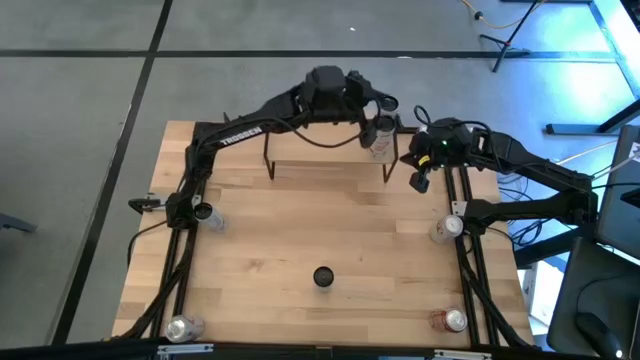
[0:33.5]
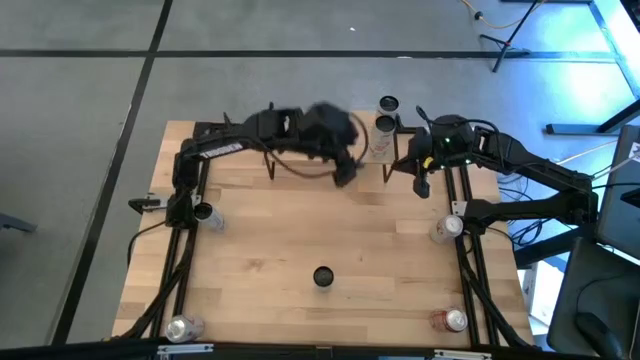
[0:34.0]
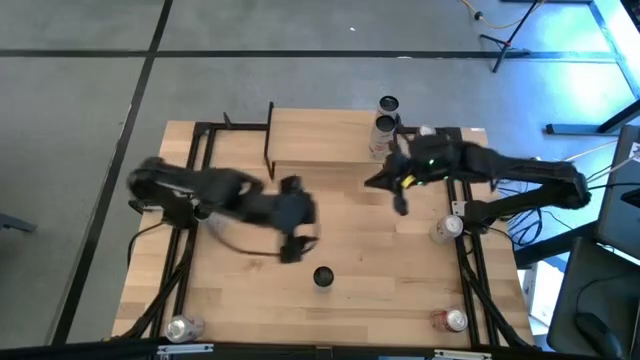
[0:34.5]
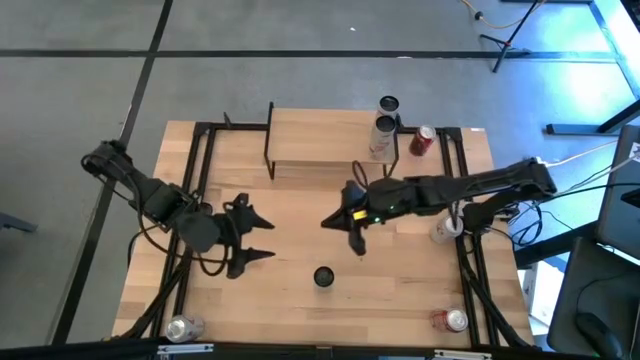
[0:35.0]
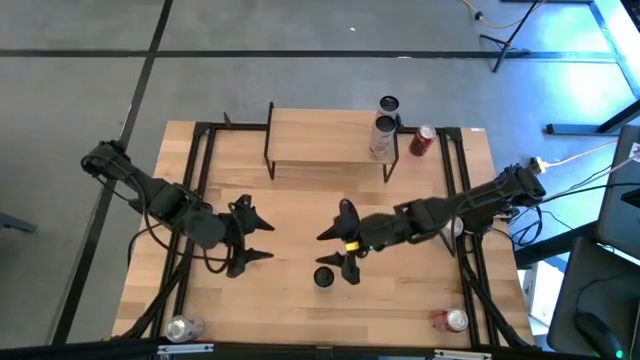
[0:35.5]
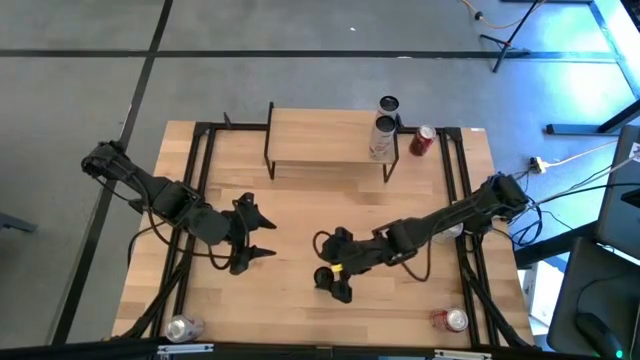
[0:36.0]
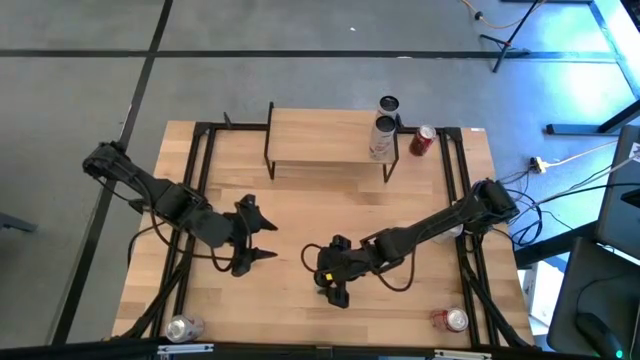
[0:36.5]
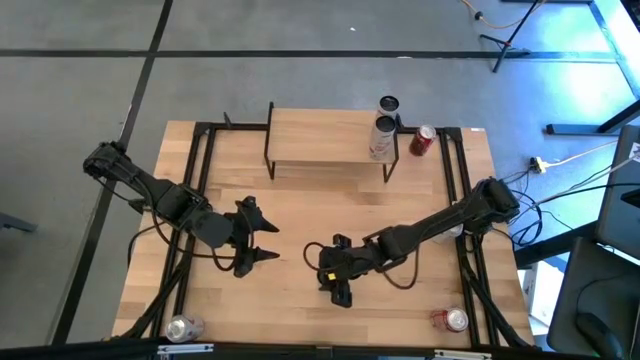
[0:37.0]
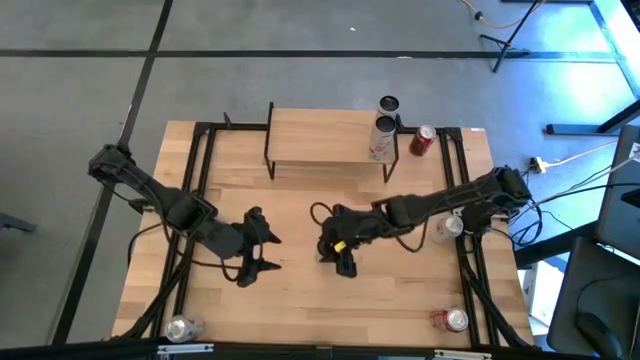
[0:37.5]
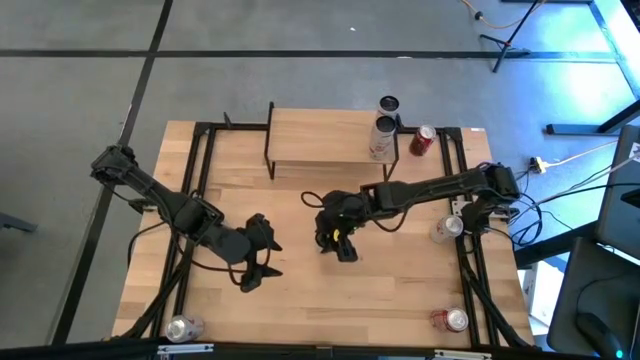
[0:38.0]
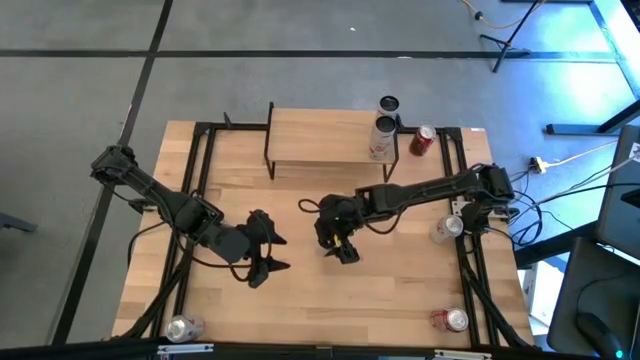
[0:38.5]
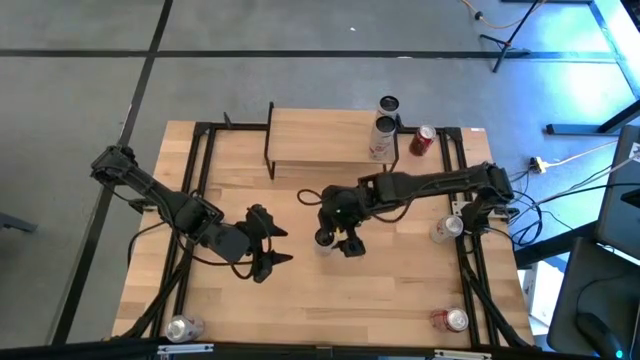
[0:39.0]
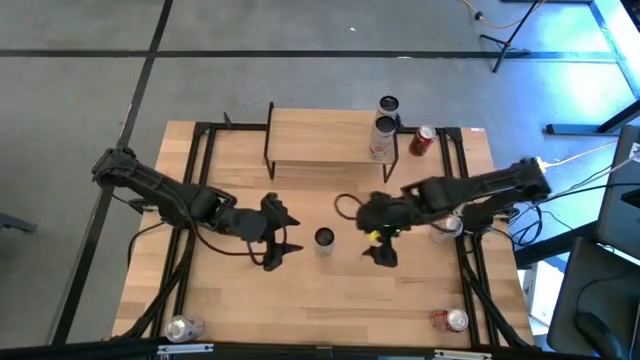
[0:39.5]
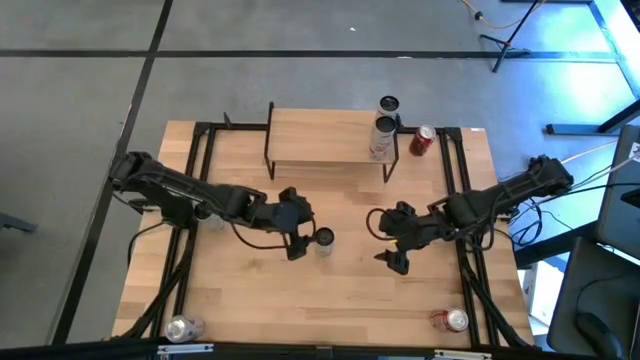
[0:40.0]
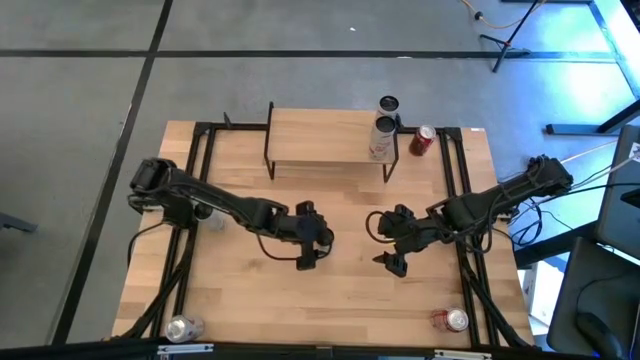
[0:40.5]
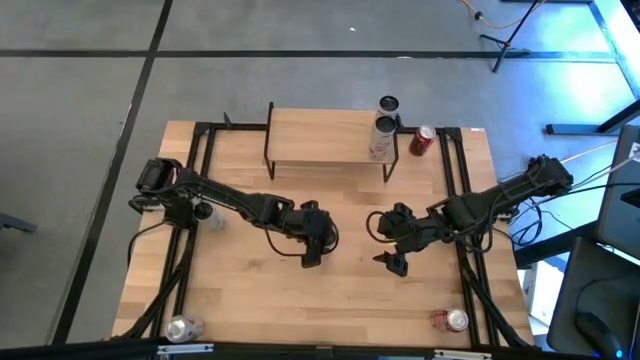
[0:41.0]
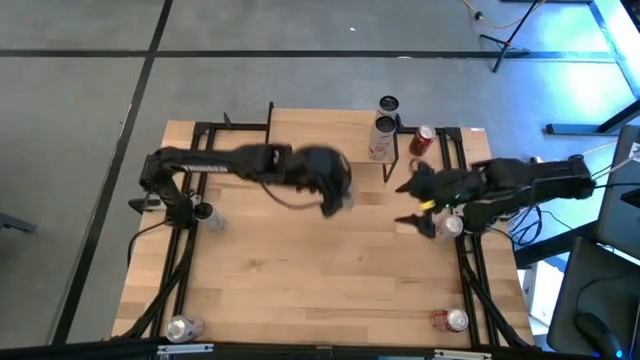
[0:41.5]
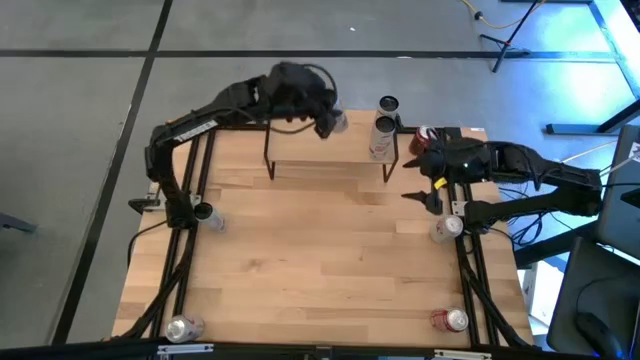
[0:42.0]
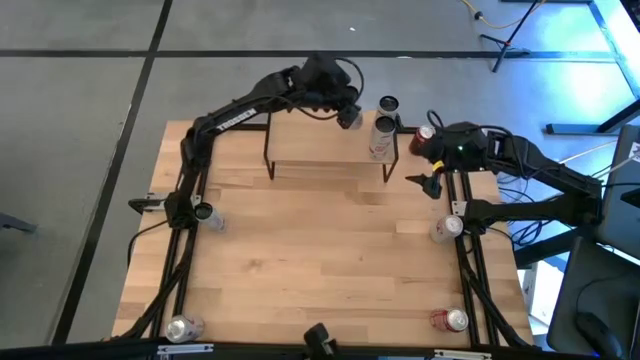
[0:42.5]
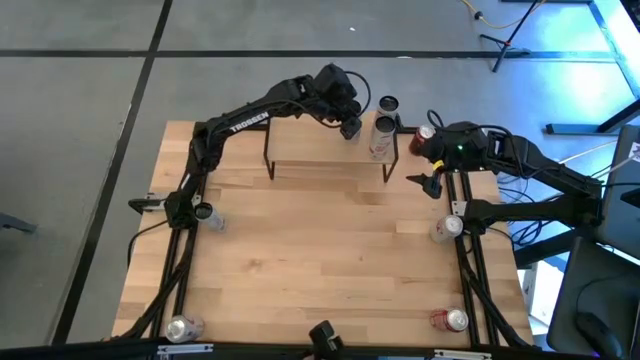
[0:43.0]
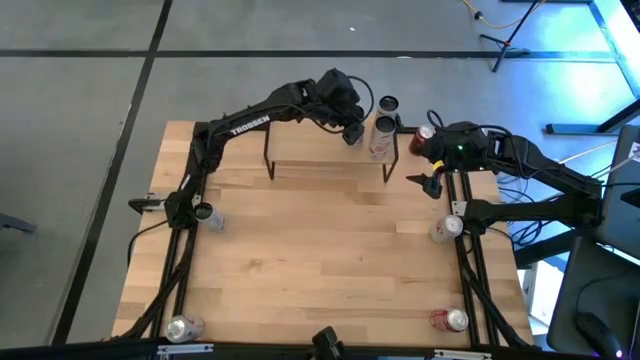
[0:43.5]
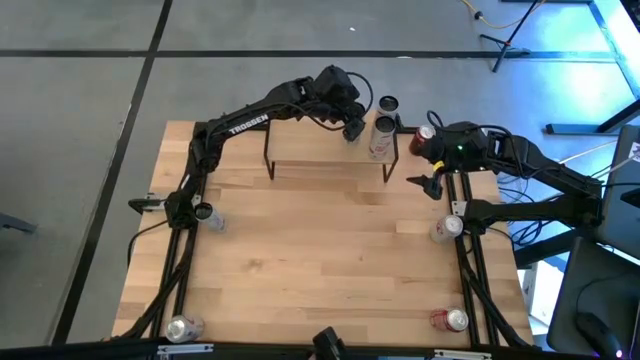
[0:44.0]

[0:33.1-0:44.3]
Task: Place canned beverage on shelf
Put the bottom white blue-soda can on the shelf

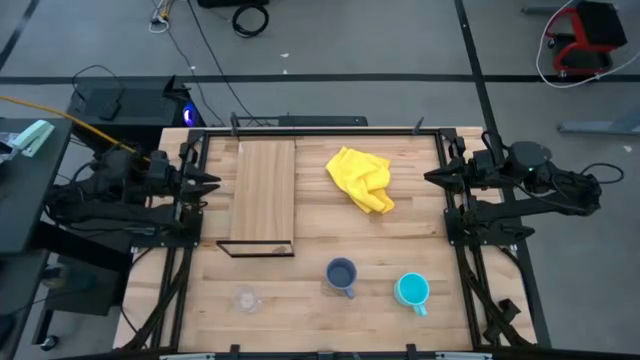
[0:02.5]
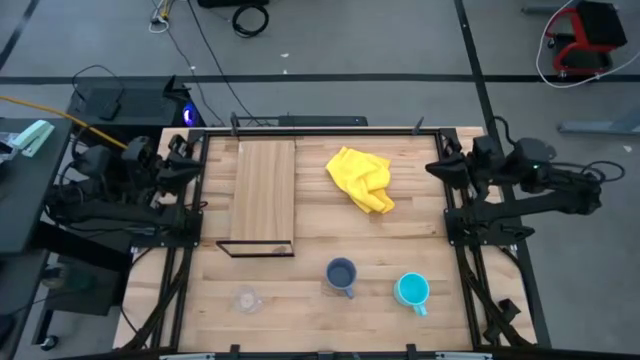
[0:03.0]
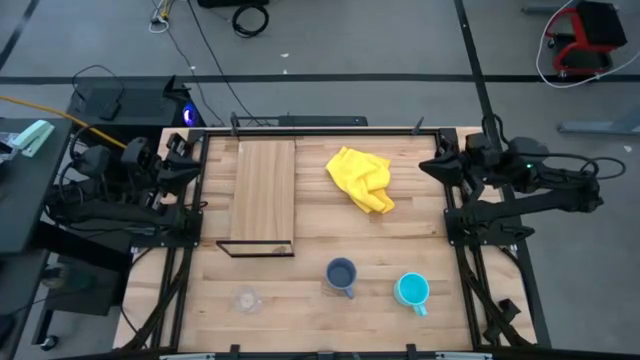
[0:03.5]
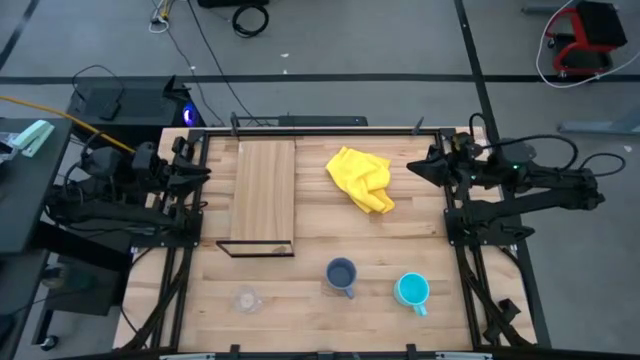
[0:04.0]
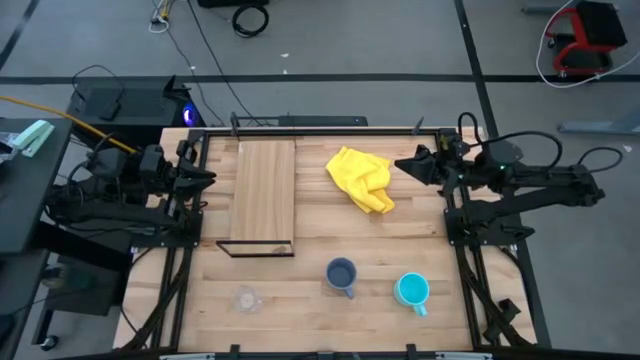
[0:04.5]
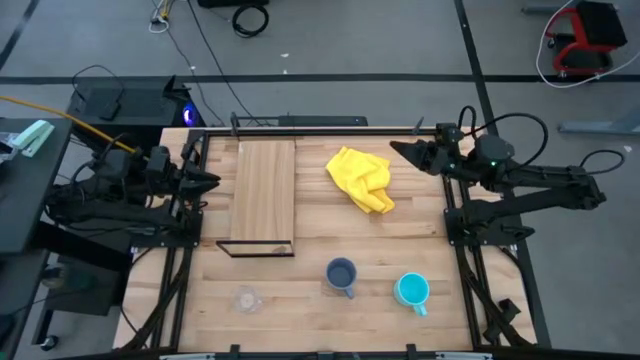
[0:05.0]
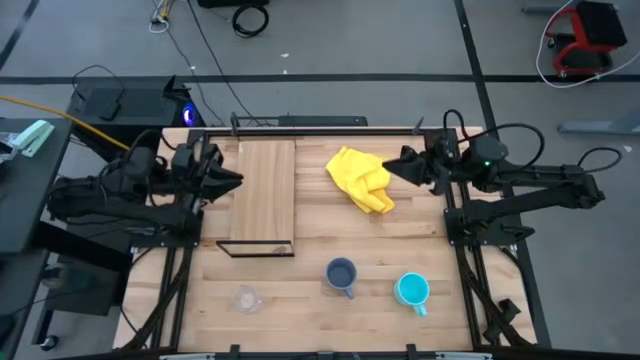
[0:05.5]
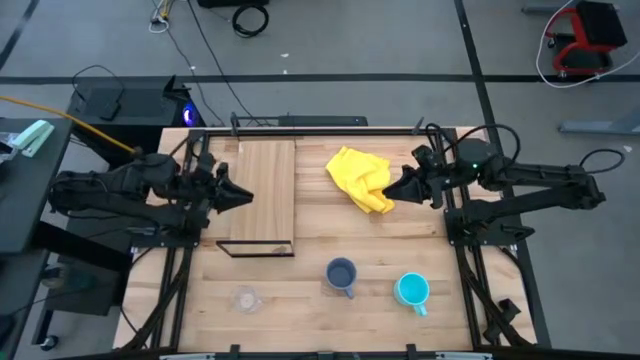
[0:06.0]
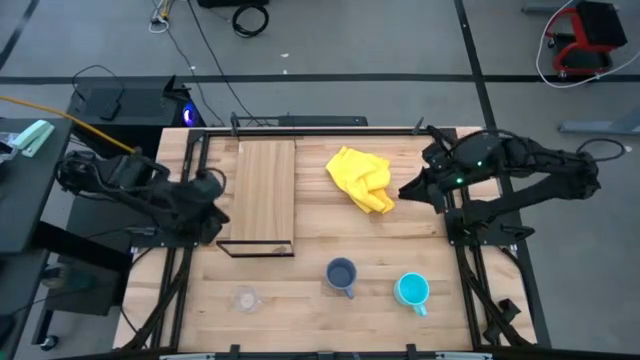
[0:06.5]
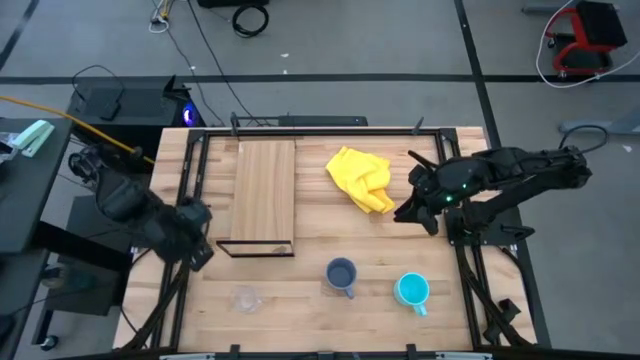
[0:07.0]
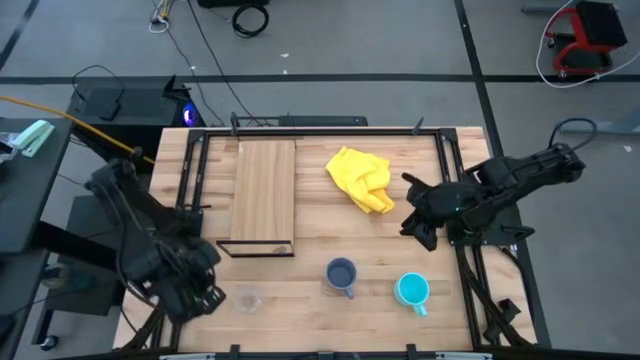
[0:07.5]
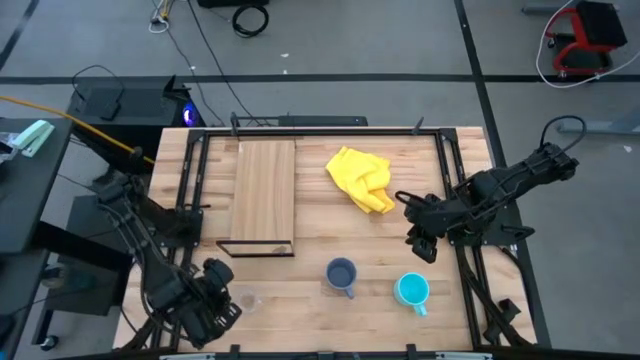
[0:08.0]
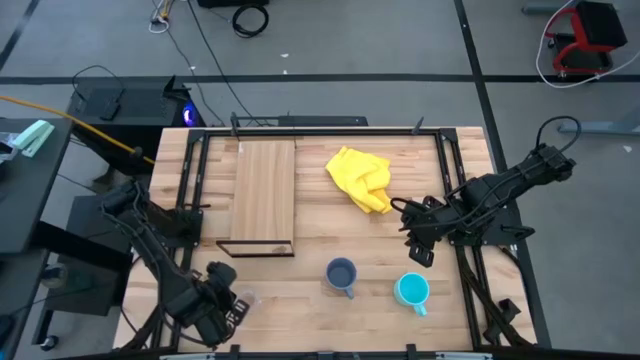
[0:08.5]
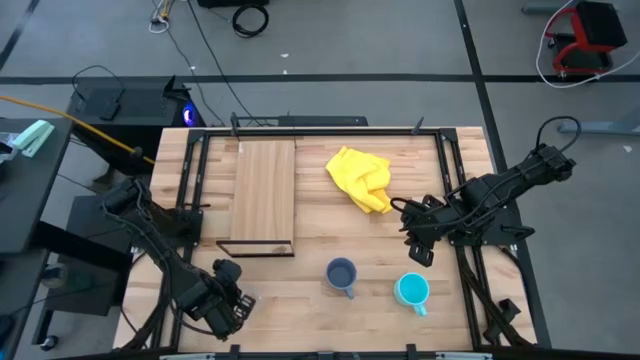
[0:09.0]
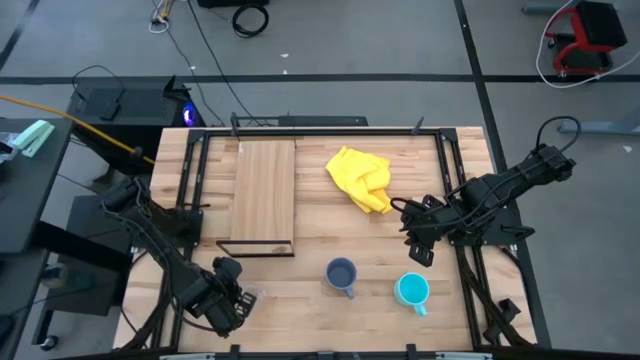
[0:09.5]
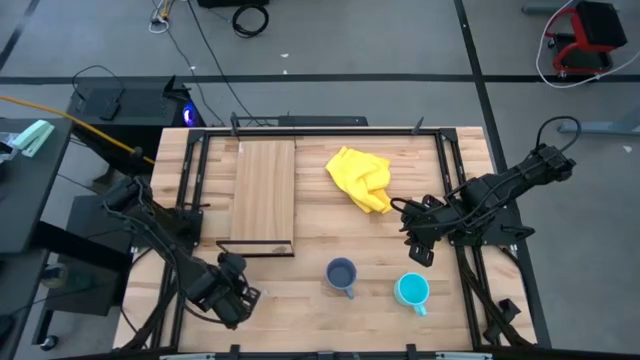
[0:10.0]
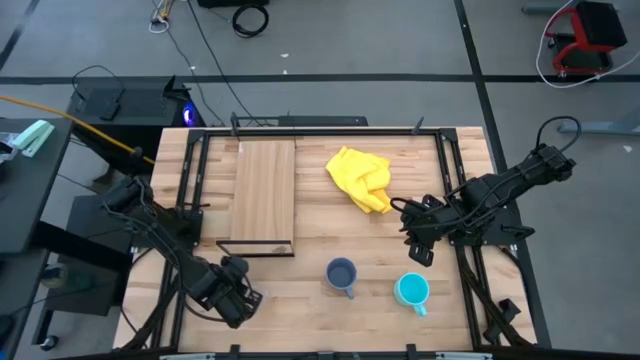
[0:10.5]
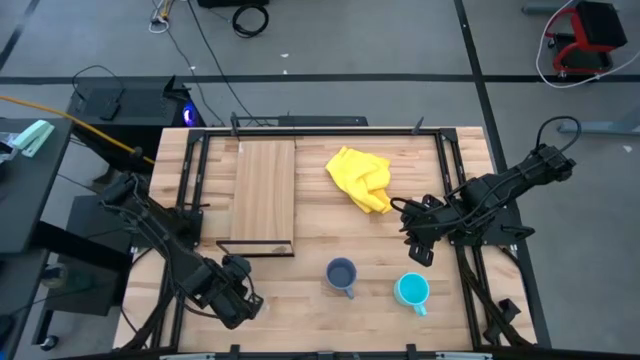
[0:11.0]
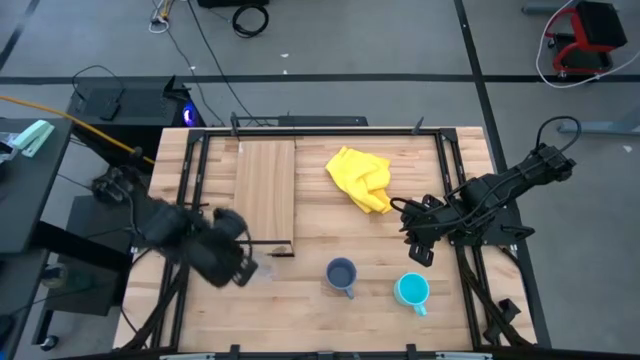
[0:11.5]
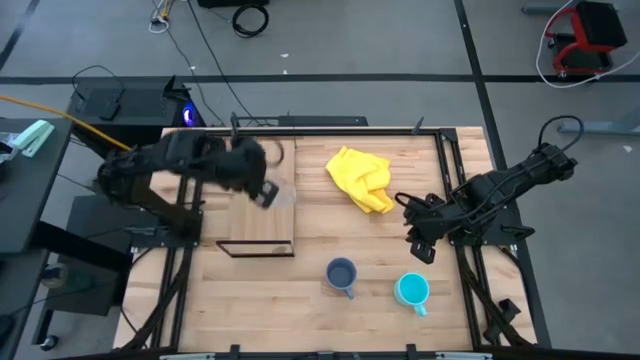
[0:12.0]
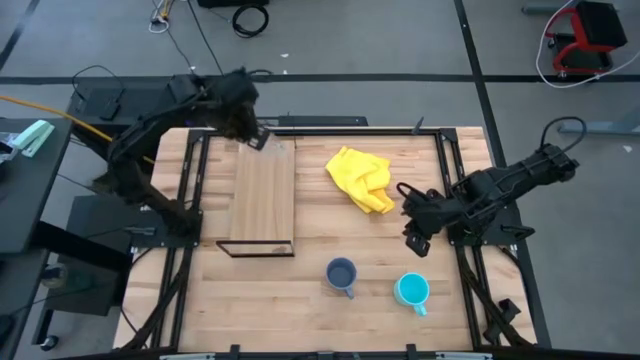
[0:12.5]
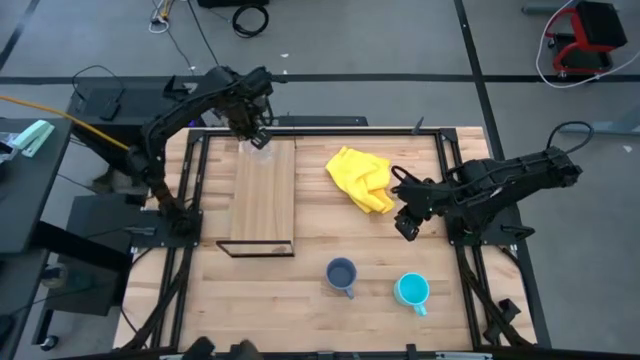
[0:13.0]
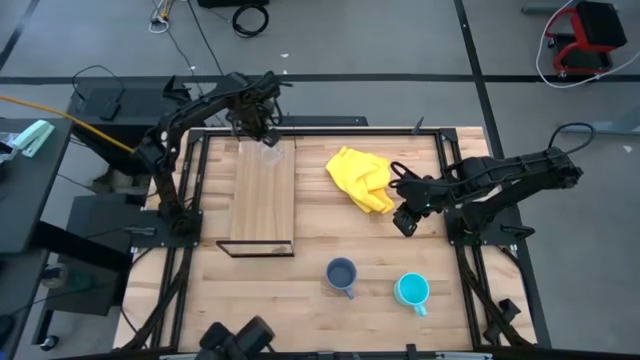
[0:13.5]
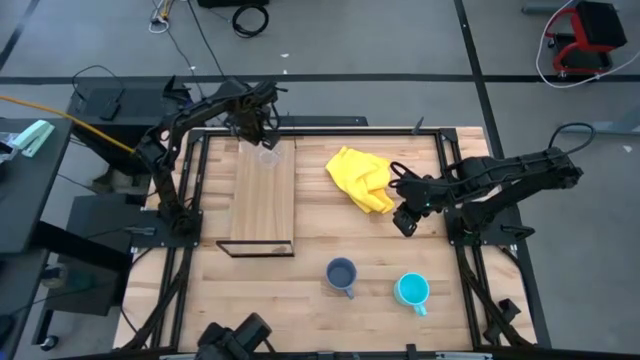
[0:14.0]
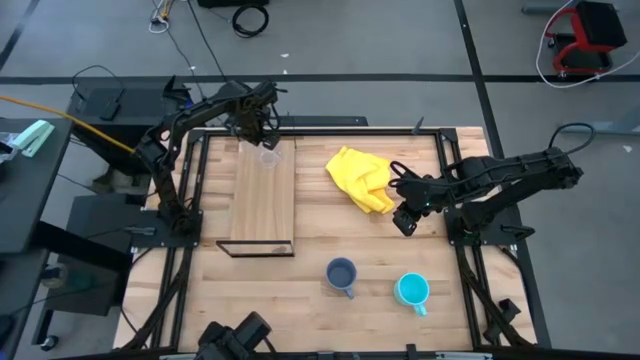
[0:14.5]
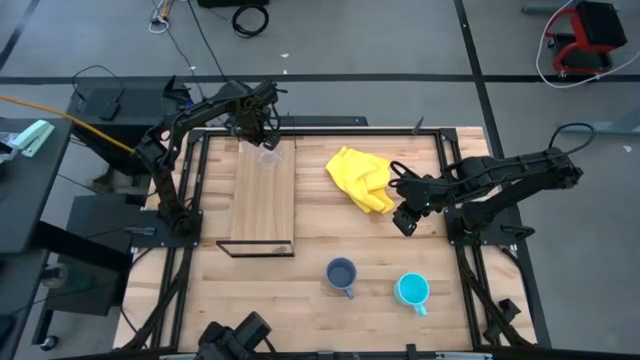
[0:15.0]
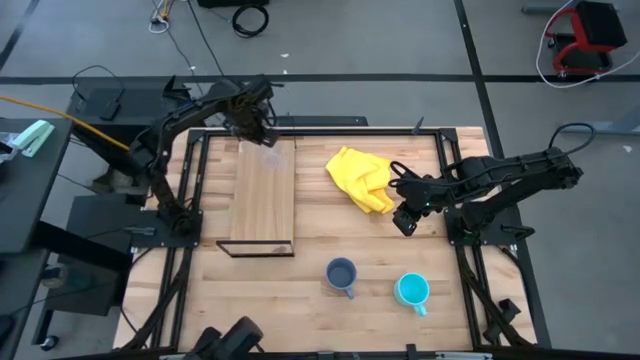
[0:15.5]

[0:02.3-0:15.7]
Task: Stack small to large cups/mugs on shelf
Put the transparent mug on the shelf
